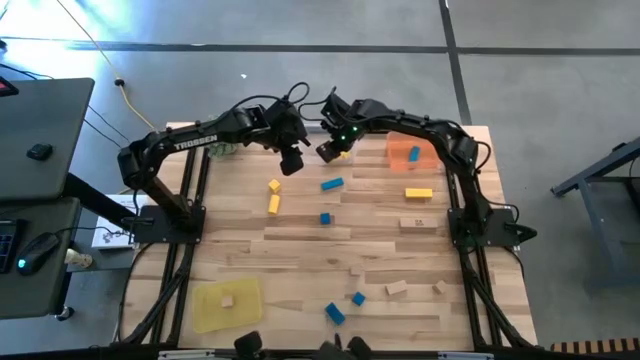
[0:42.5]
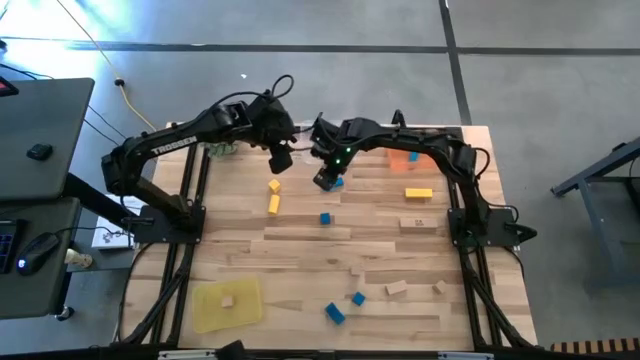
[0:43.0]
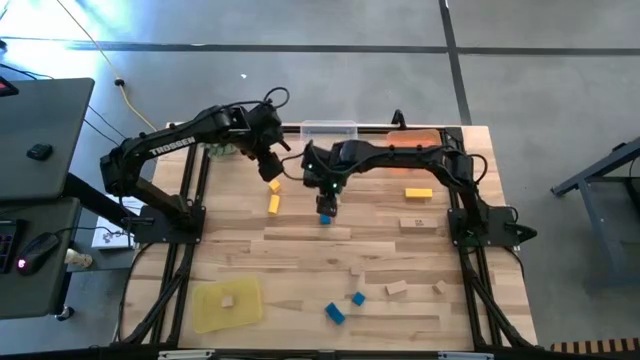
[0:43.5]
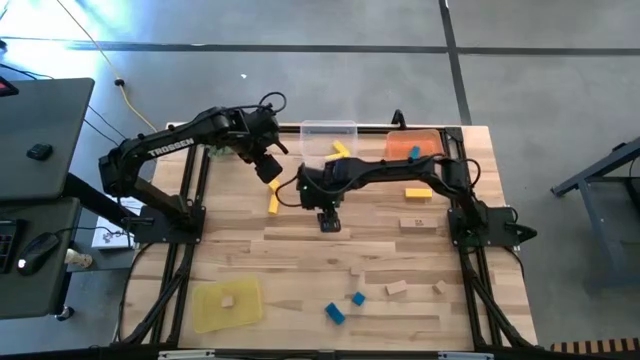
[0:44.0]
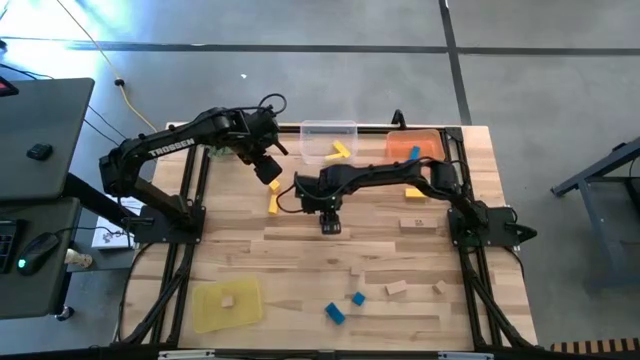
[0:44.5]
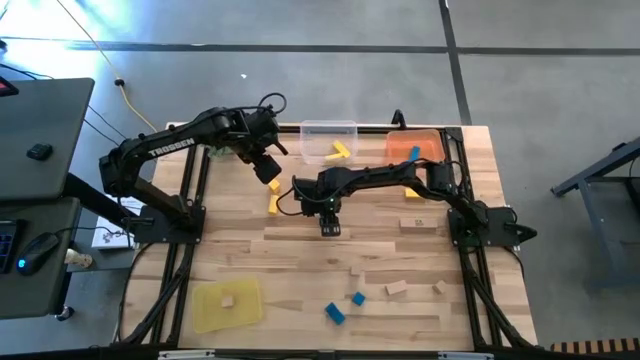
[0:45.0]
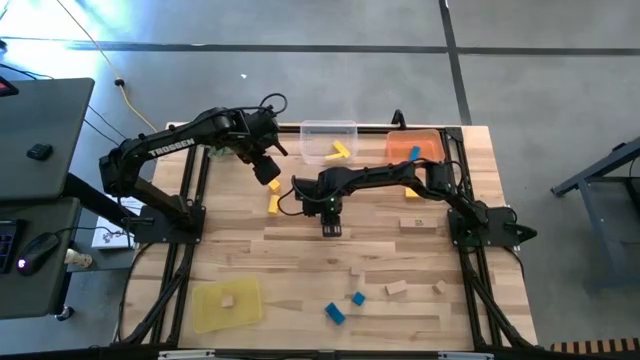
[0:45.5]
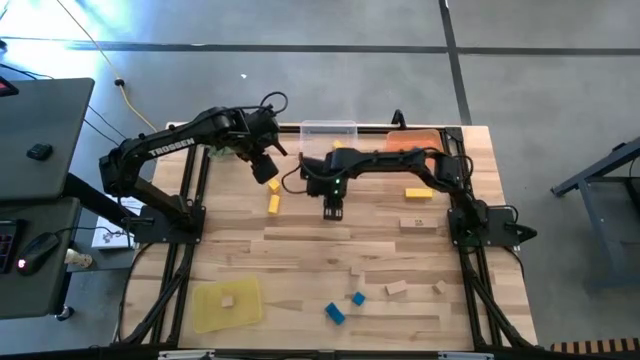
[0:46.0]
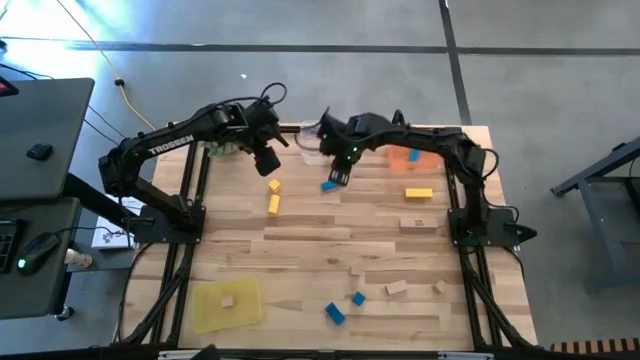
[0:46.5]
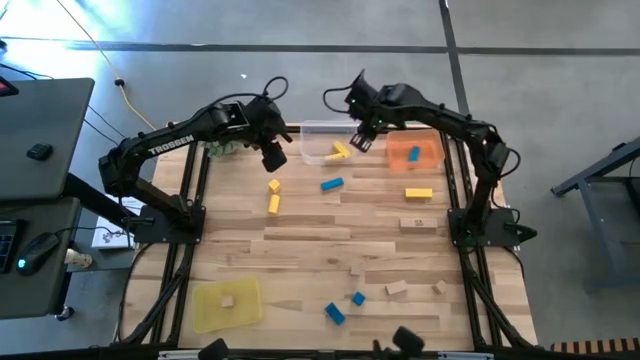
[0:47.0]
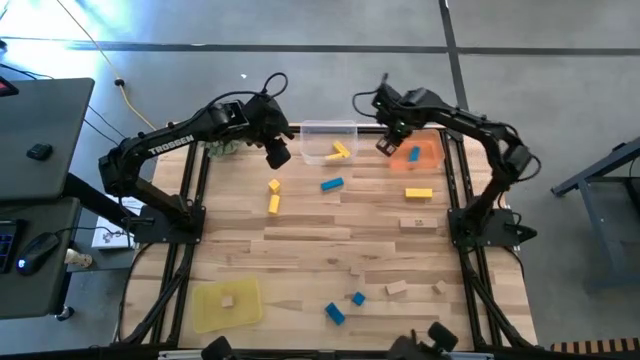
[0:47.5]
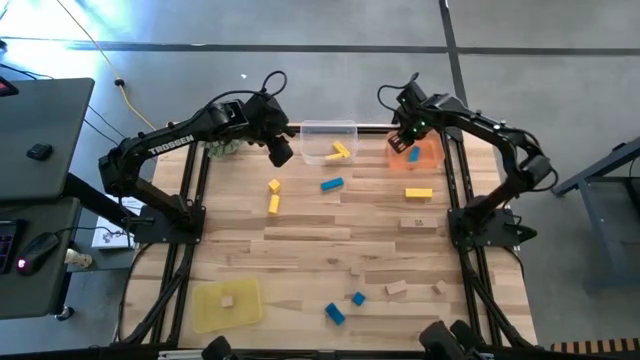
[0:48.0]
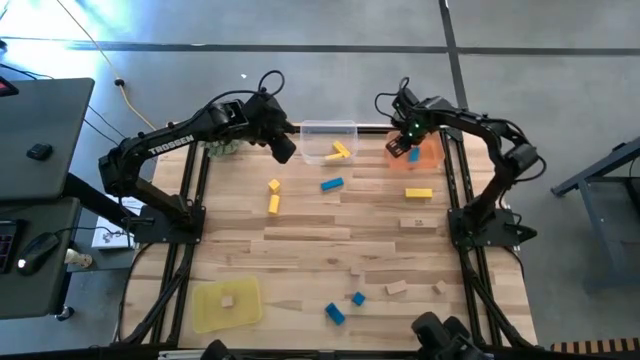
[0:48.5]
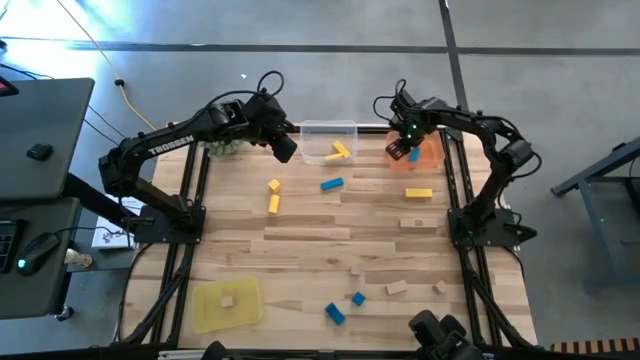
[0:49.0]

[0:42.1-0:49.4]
Task: Sort & place blocks by color
Put the blue block into the orange bin

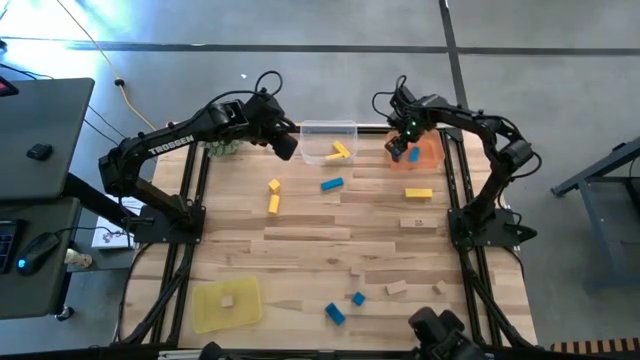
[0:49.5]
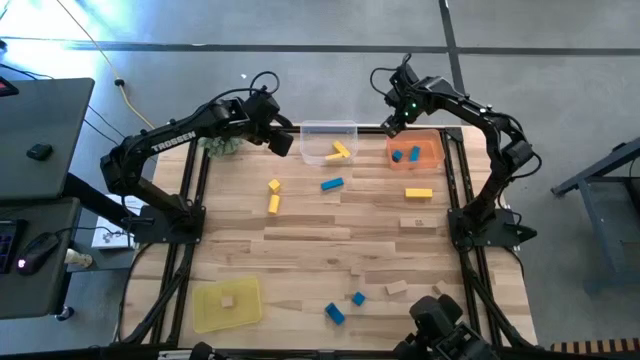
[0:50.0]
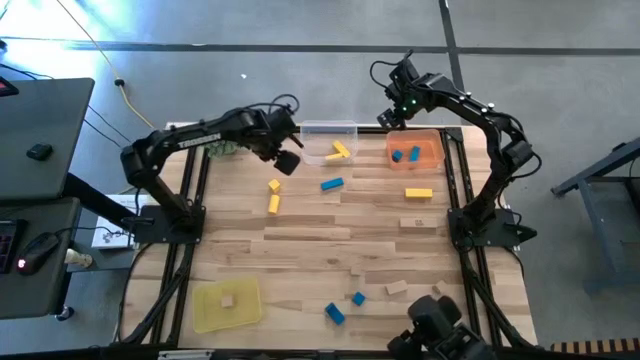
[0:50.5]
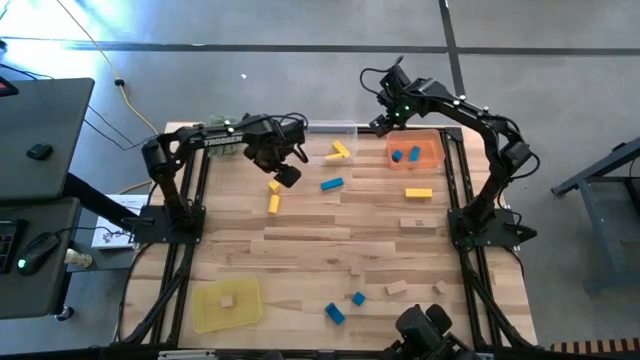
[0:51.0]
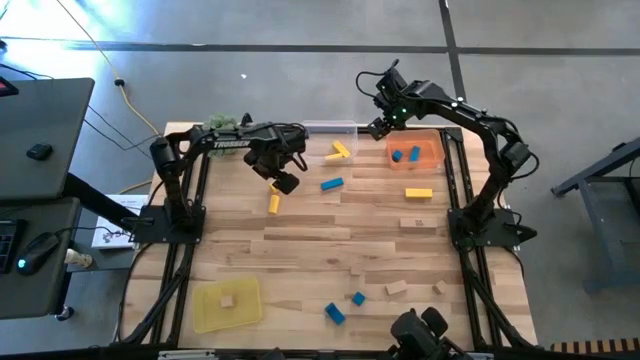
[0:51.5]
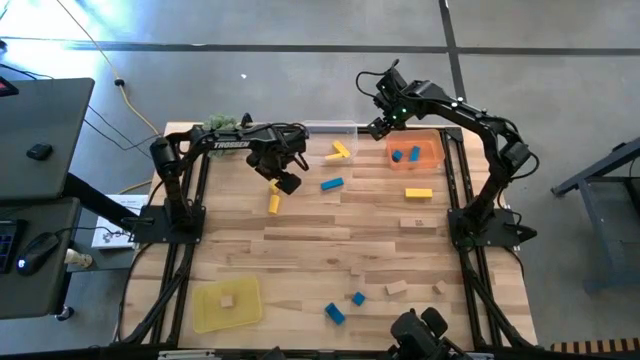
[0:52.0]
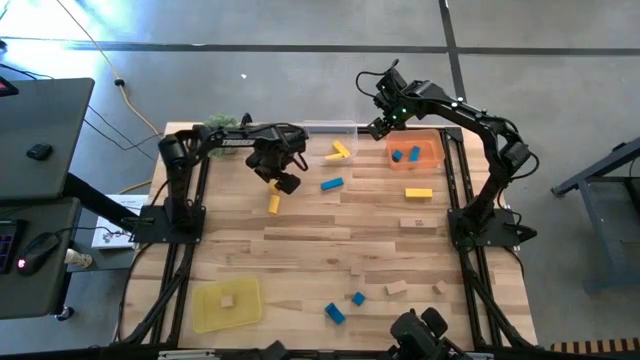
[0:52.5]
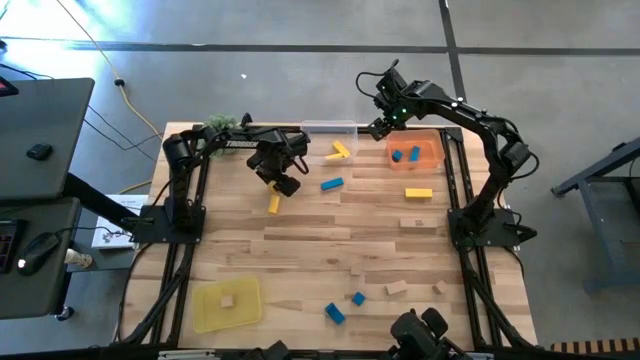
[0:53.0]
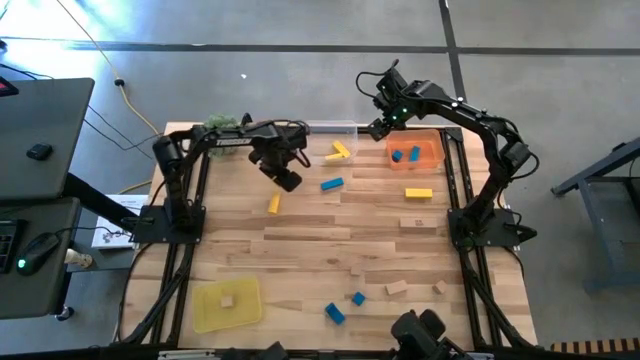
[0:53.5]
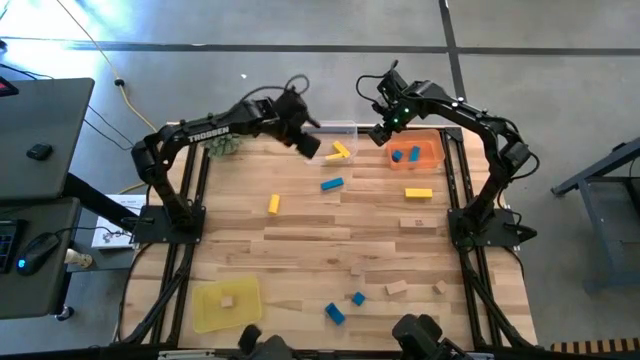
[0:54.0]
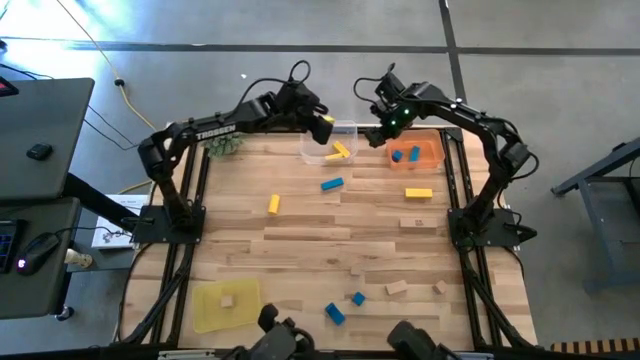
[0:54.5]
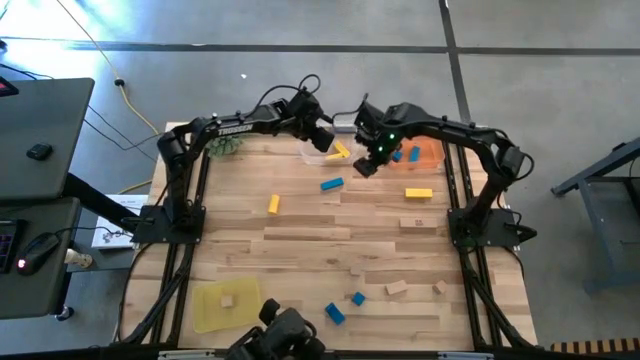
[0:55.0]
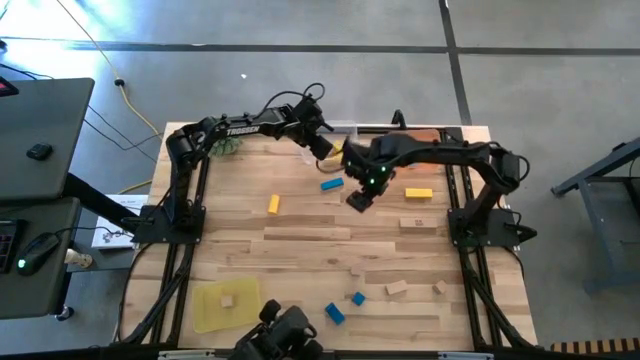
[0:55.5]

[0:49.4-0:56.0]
Put the yellow block into the transparent bin

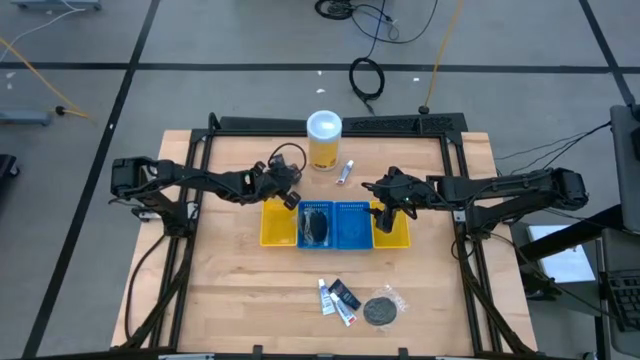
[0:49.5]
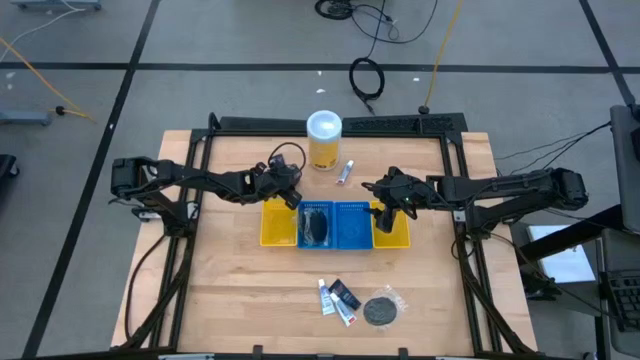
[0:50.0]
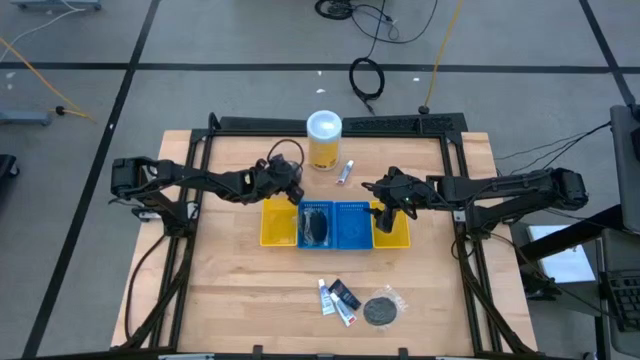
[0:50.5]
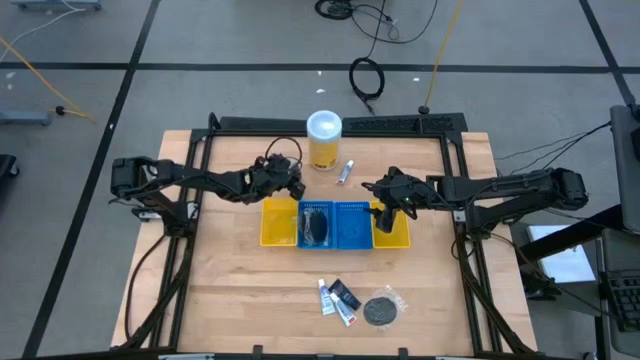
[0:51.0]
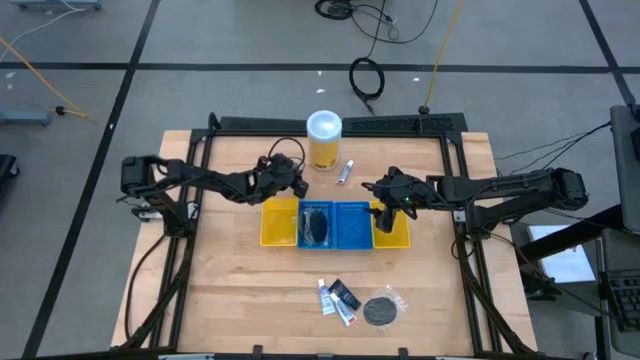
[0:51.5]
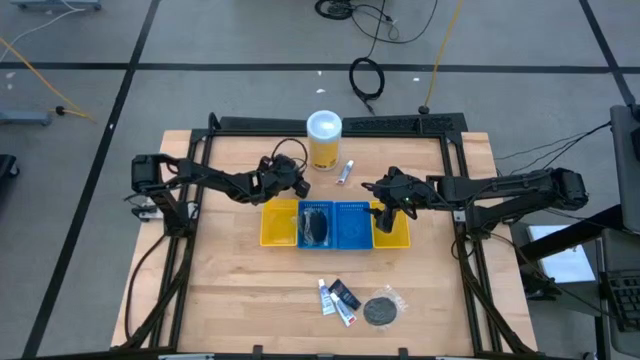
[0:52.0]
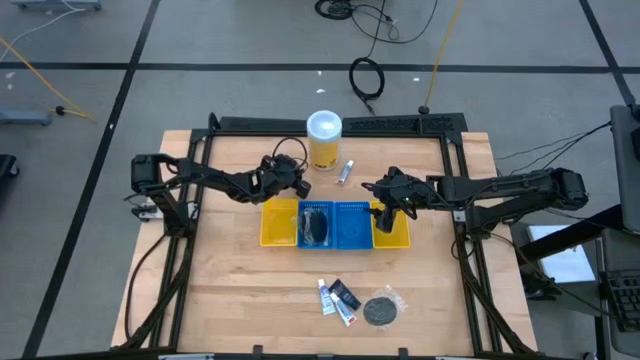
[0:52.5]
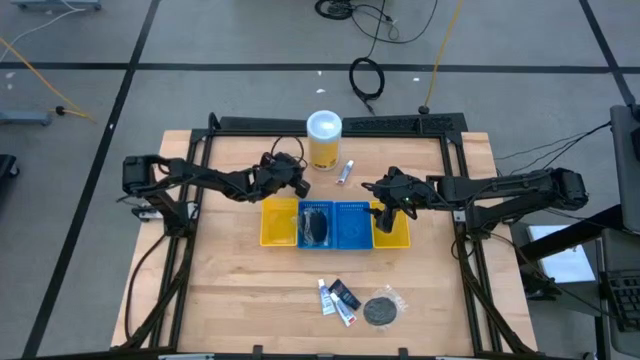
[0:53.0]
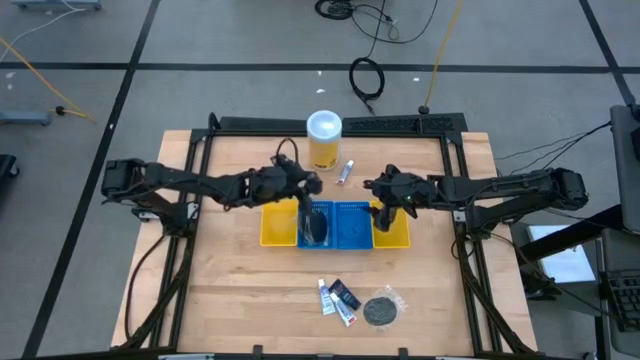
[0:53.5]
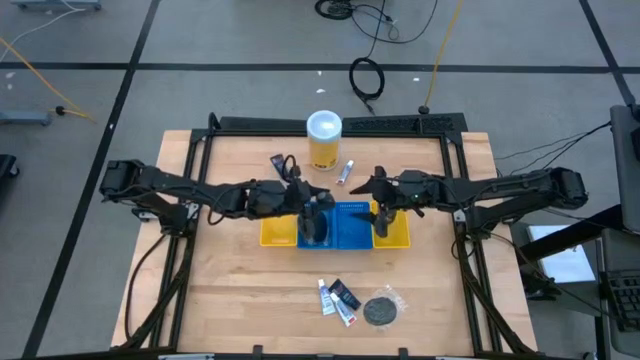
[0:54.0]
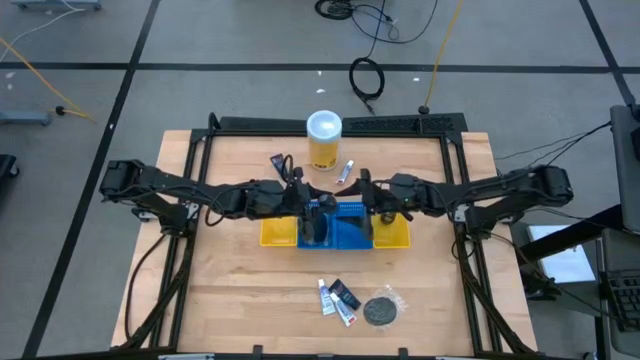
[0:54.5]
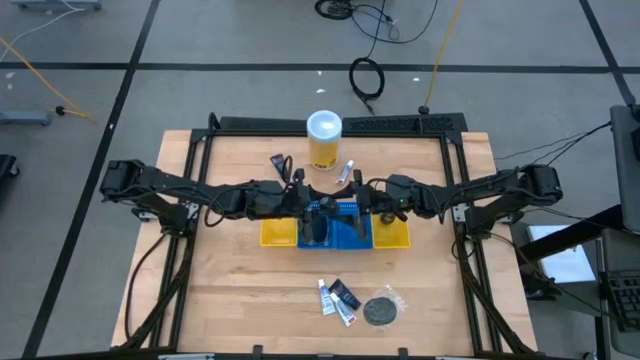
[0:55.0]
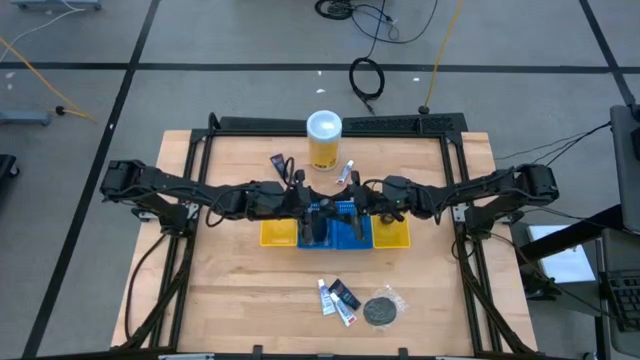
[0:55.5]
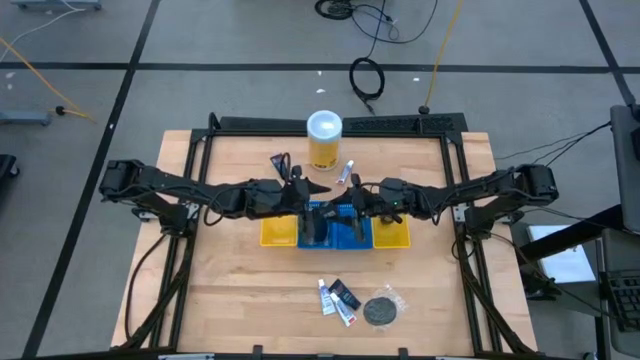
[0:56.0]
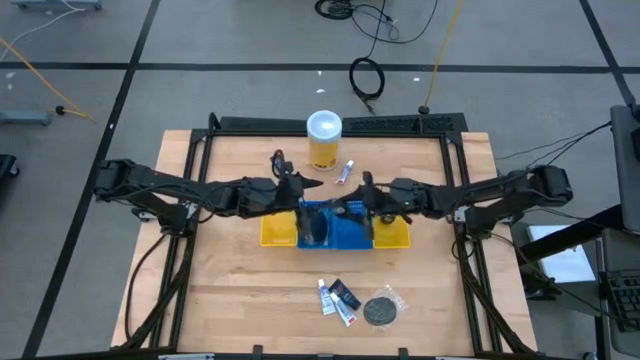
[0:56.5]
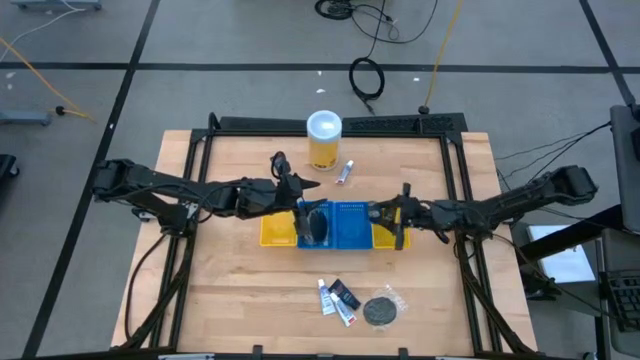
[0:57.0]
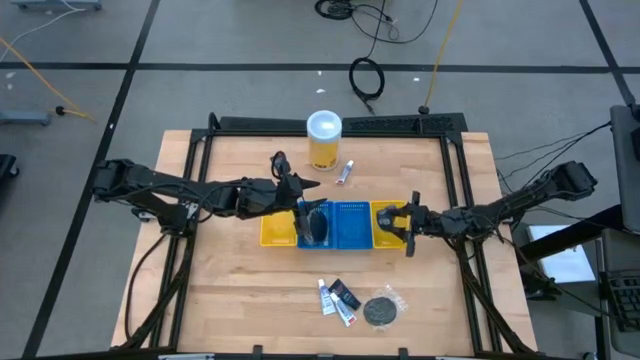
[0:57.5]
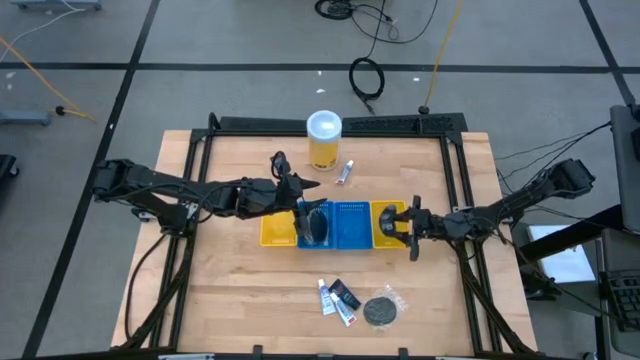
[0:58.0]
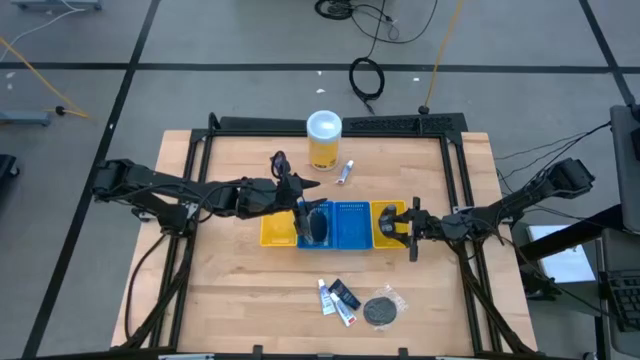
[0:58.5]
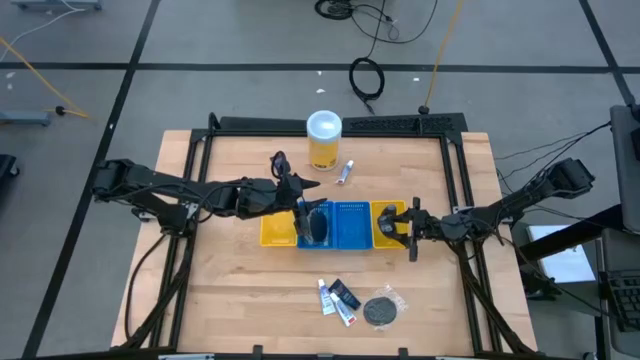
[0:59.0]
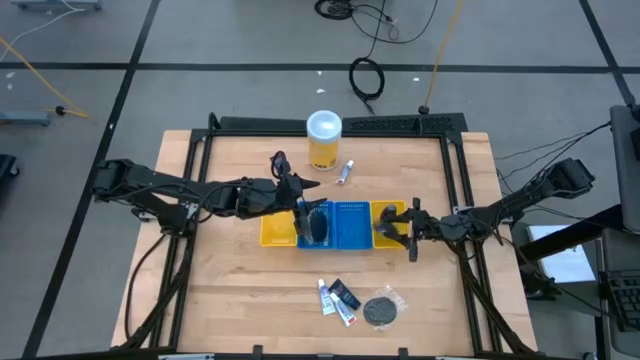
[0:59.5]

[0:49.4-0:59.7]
Task: Pick & Place Travel size toiletries
Put the black deodorant into the right yellow bin
